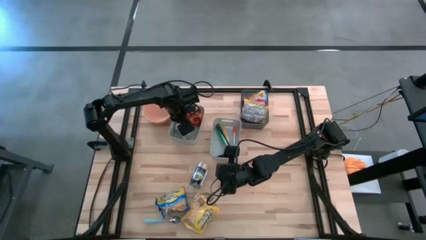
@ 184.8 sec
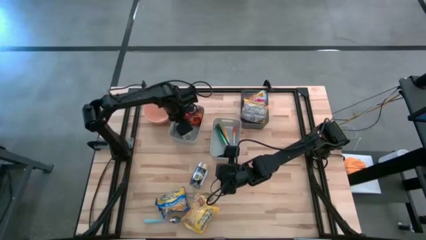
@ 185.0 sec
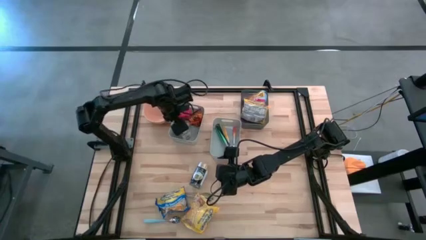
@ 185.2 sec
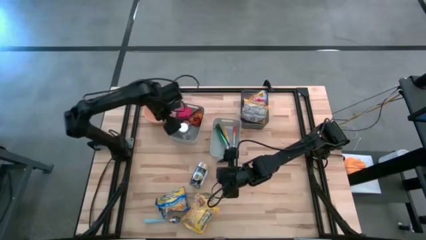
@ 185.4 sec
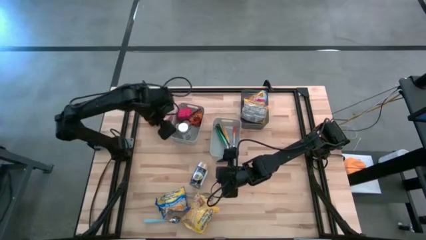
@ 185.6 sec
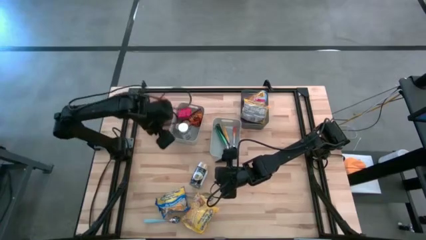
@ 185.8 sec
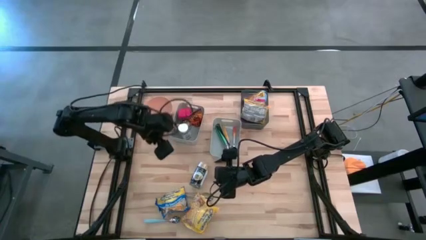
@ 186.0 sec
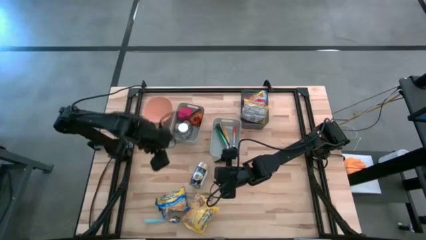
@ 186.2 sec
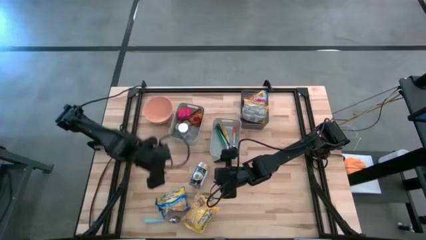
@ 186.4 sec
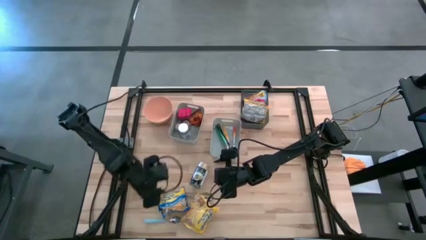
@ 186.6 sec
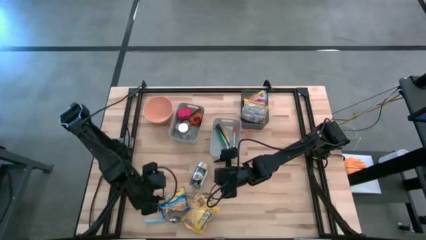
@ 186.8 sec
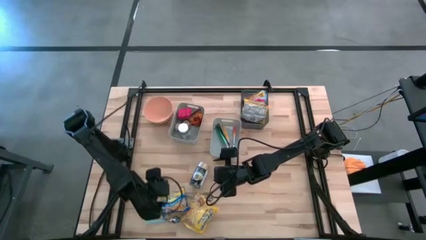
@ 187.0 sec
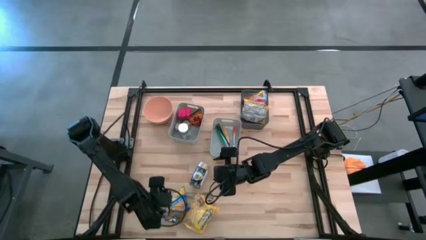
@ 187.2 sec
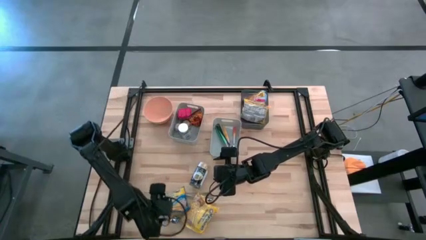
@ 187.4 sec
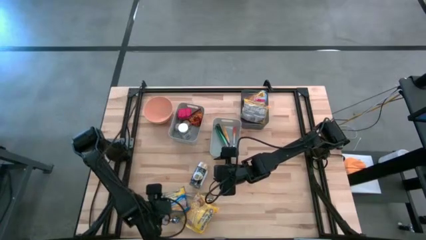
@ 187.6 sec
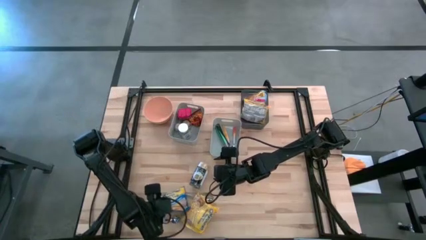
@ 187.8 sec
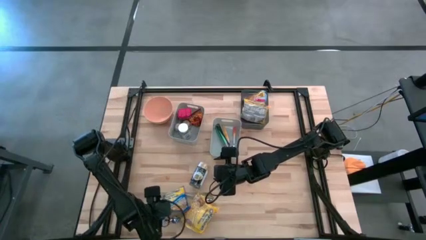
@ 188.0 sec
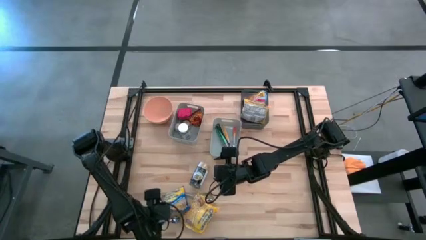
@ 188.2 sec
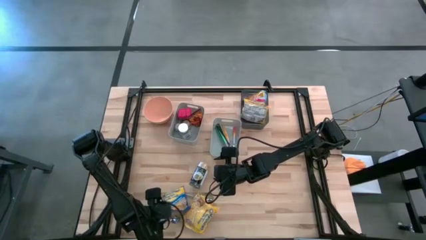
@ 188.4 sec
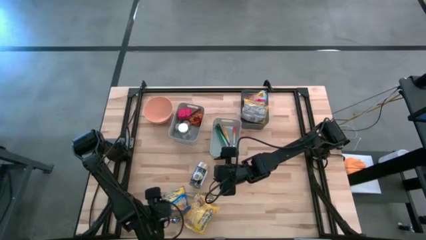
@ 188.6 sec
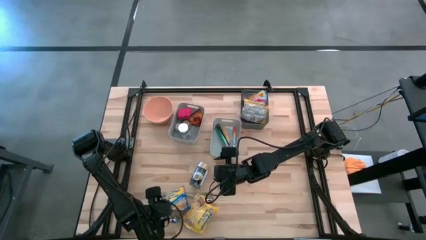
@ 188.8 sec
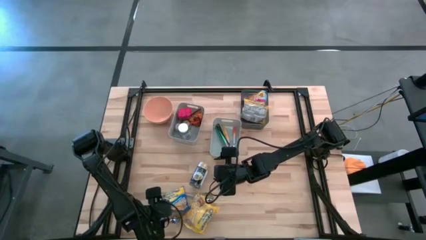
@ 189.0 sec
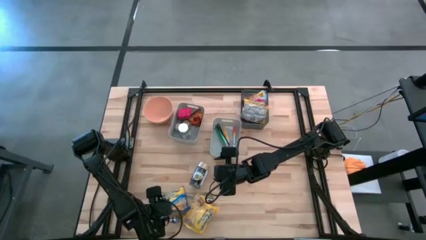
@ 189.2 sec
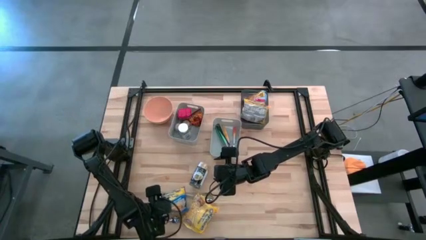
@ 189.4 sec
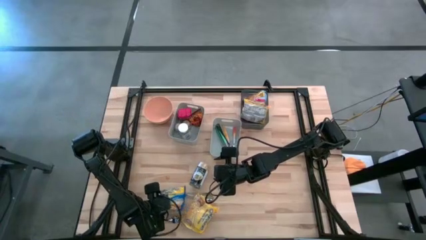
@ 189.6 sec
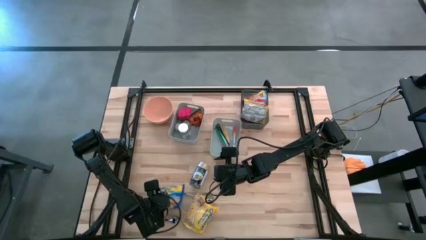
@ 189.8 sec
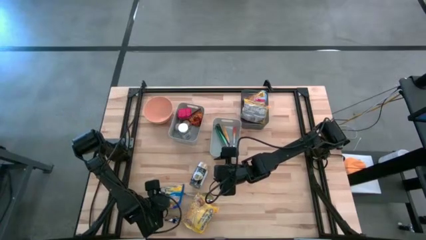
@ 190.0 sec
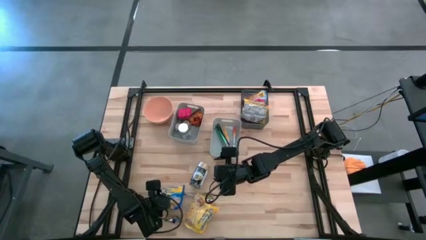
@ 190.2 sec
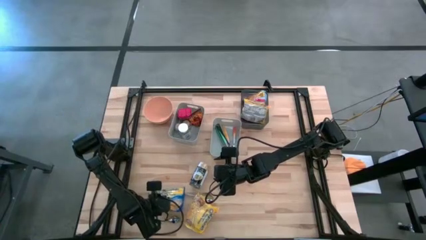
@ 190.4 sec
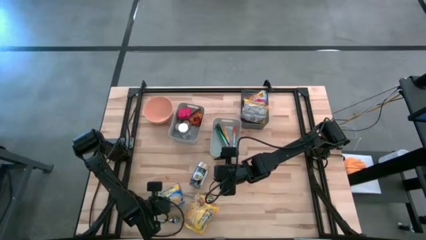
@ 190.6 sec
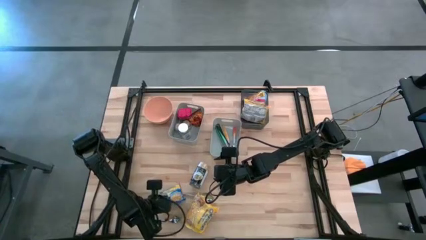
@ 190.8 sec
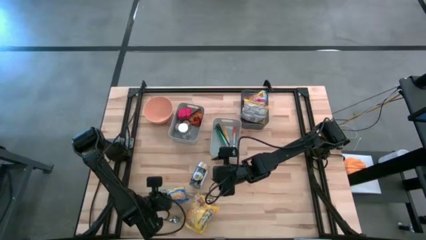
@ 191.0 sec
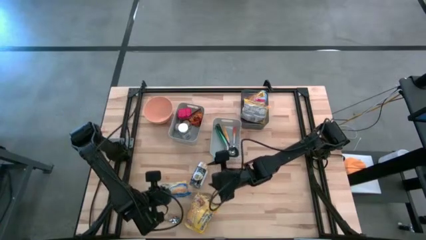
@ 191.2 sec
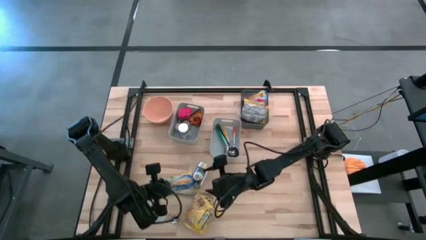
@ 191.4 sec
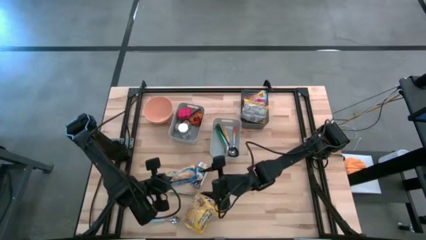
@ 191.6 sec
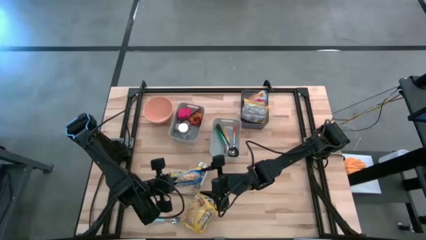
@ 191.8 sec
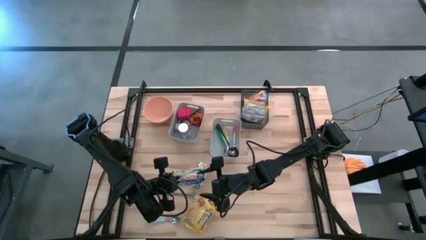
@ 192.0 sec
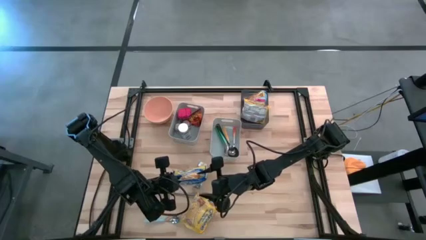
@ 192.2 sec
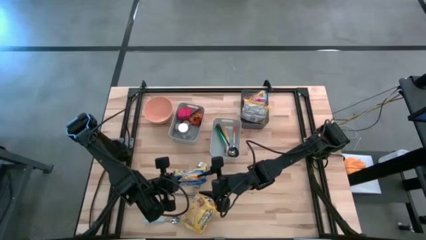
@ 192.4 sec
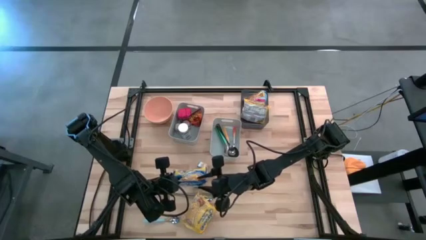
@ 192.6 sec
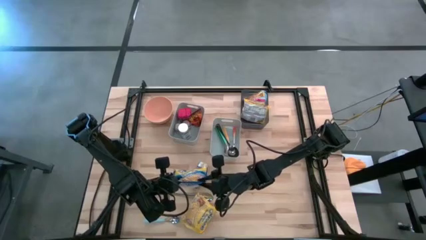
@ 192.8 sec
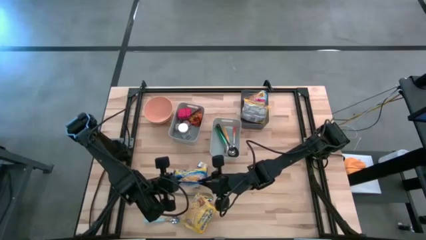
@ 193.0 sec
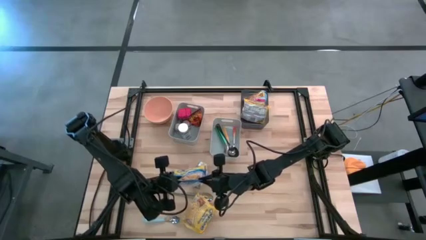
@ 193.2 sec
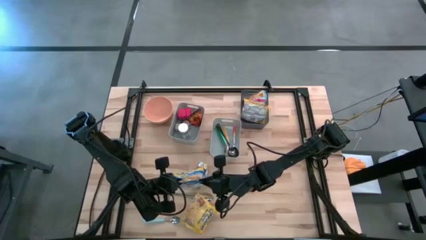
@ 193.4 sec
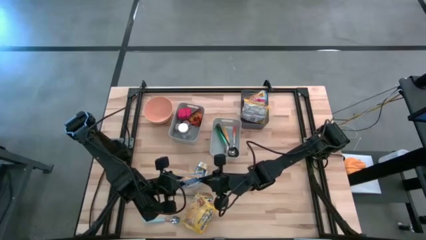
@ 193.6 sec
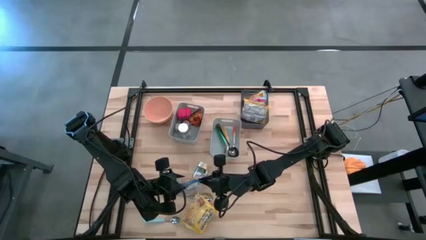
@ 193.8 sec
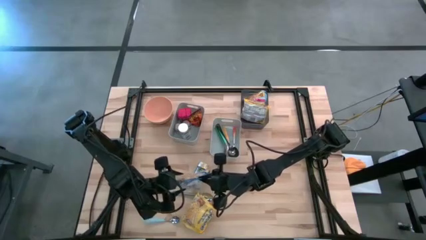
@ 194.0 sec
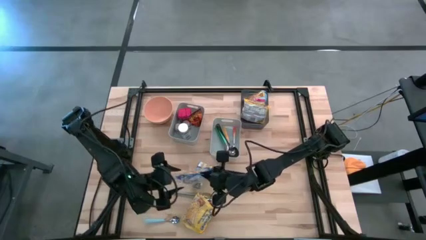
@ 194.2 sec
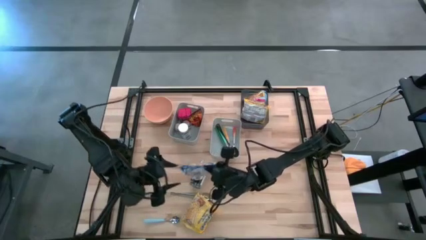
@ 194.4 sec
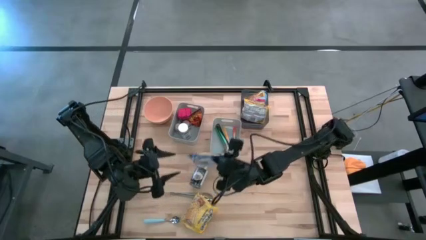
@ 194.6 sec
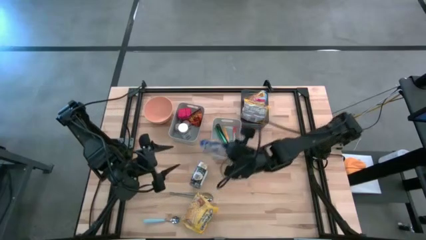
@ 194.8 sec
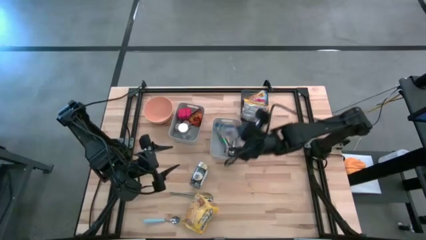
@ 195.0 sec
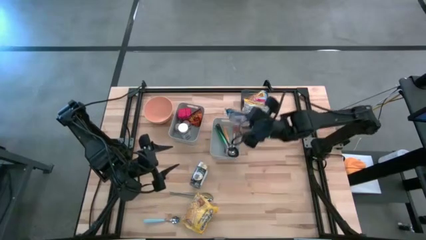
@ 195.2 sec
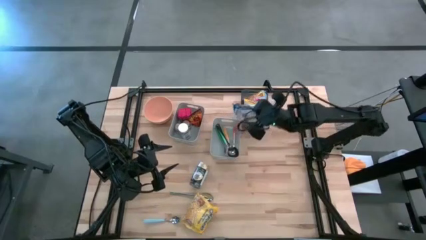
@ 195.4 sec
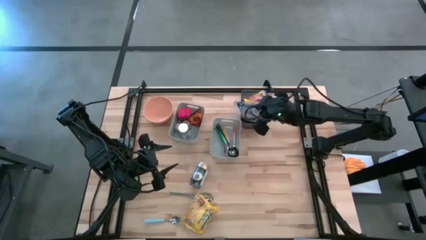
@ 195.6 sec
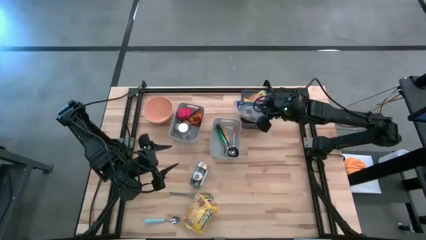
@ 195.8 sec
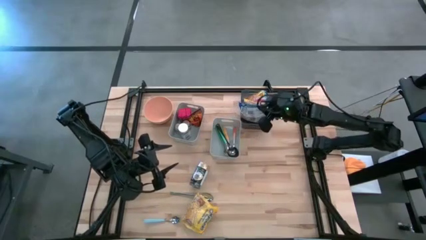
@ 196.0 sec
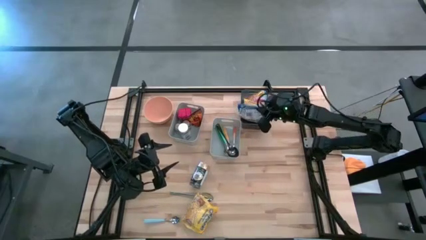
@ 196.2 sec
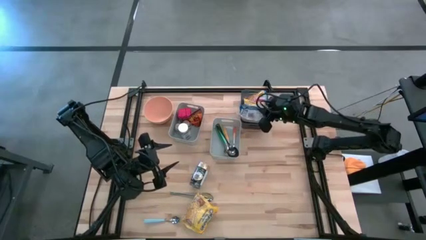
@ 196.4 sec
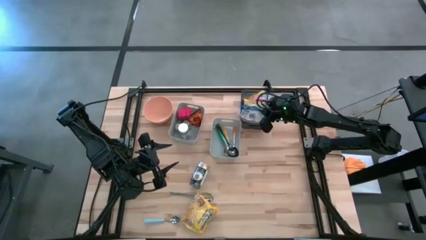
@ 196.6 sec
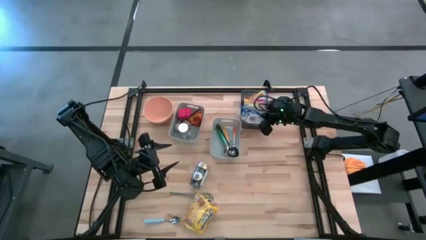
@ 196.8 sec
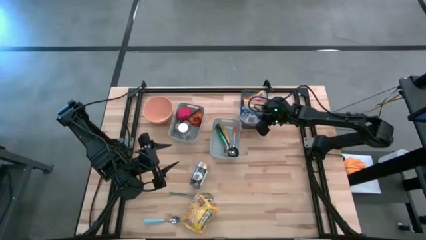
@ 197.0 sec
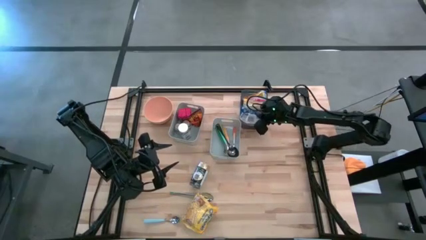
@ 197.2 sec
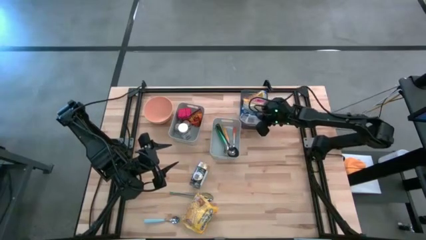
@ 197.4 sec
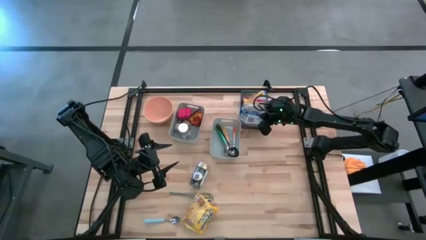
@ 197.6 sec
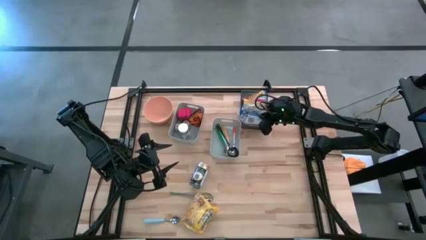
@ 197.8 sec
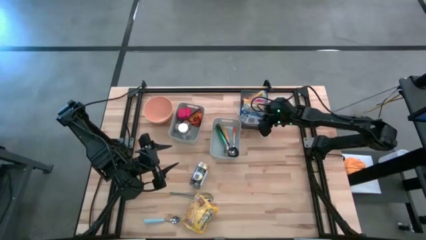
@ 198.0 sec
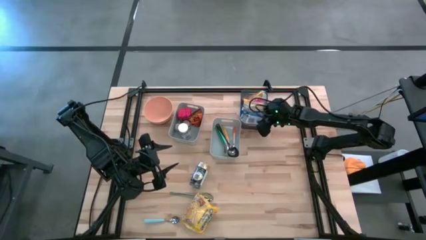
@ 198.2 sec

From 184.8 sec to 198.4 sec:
Put the blue noodle pack into the black bin
